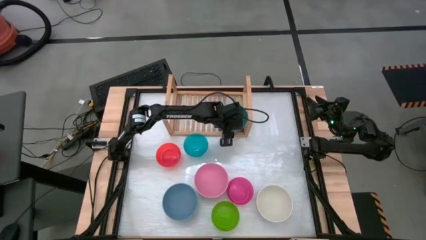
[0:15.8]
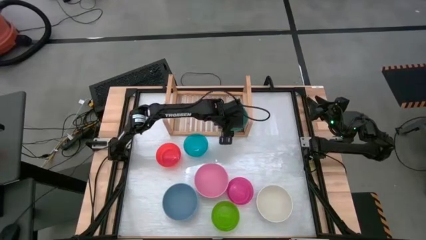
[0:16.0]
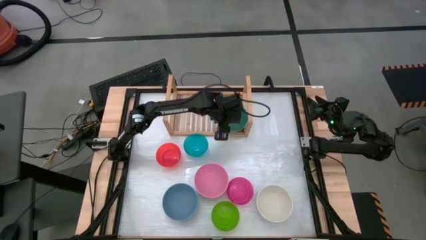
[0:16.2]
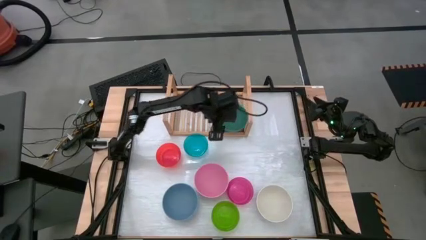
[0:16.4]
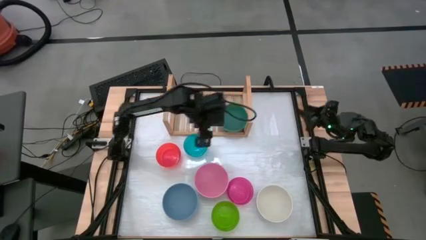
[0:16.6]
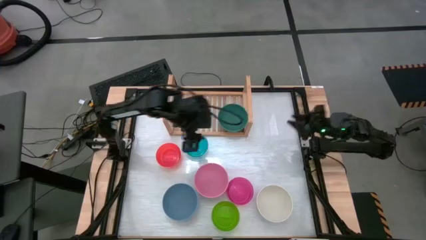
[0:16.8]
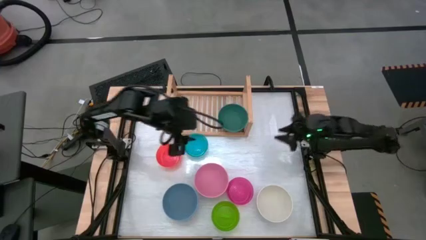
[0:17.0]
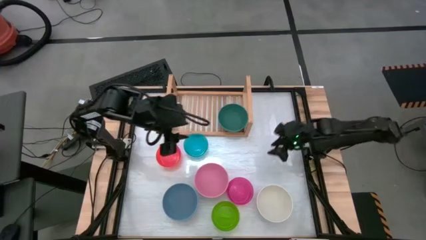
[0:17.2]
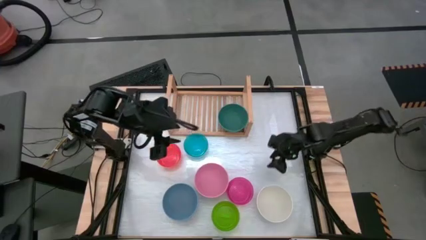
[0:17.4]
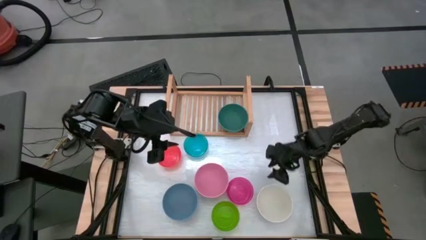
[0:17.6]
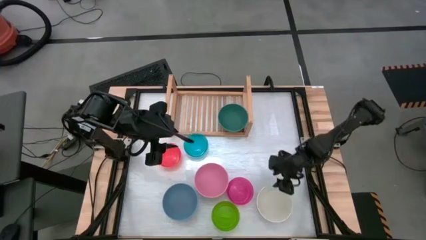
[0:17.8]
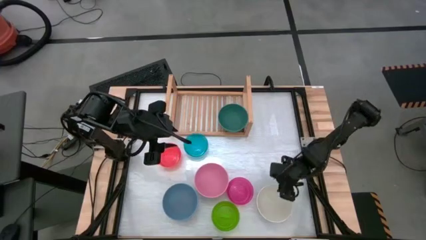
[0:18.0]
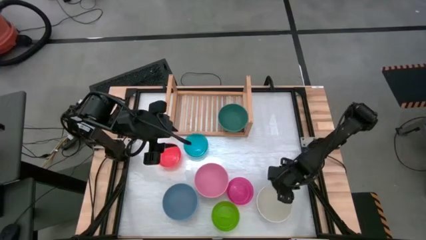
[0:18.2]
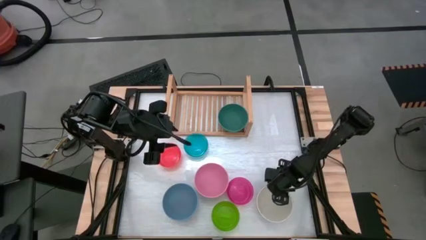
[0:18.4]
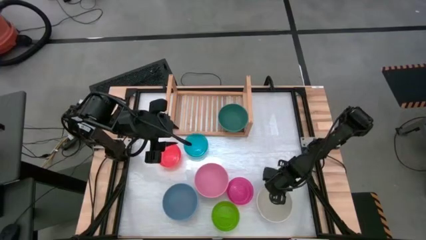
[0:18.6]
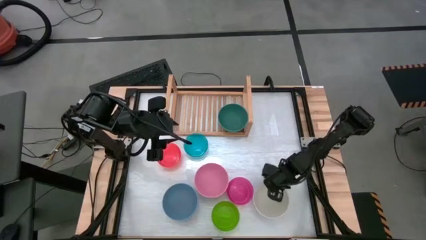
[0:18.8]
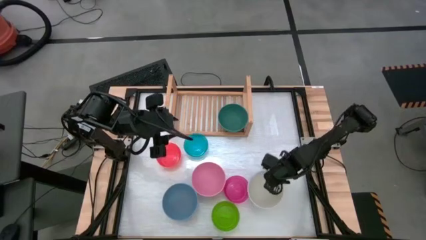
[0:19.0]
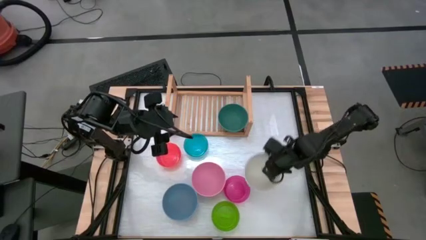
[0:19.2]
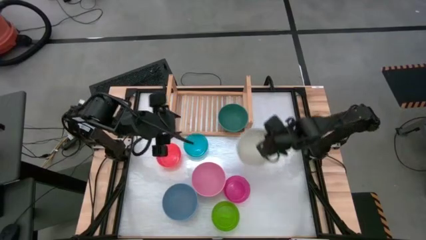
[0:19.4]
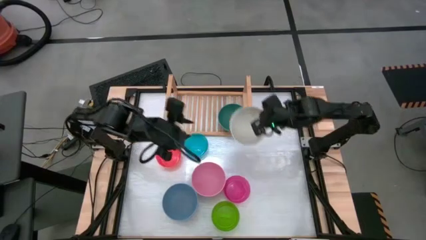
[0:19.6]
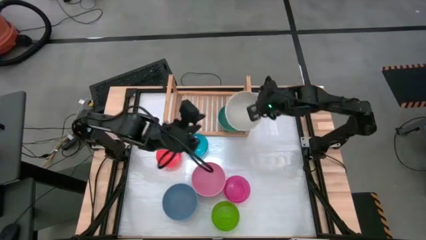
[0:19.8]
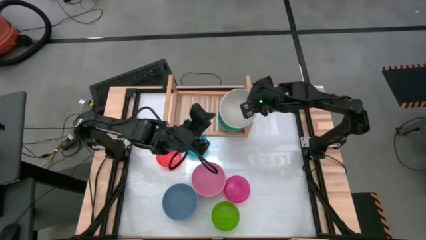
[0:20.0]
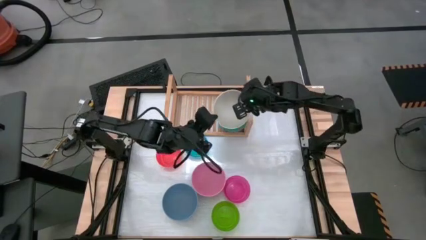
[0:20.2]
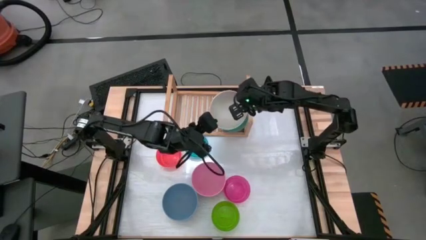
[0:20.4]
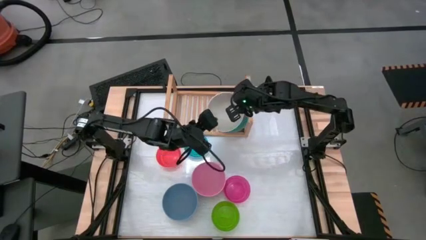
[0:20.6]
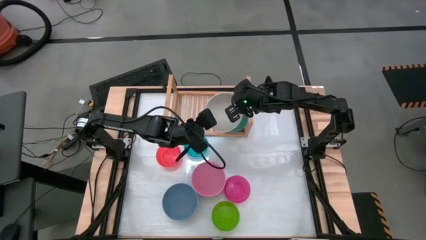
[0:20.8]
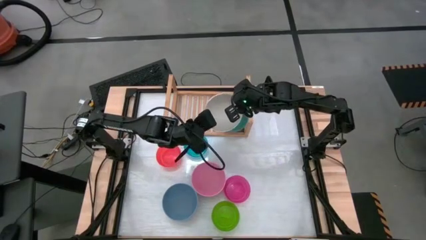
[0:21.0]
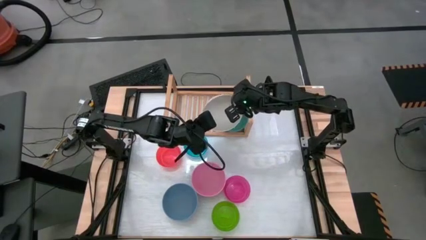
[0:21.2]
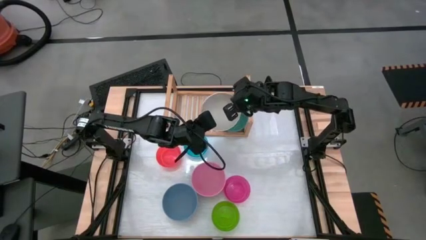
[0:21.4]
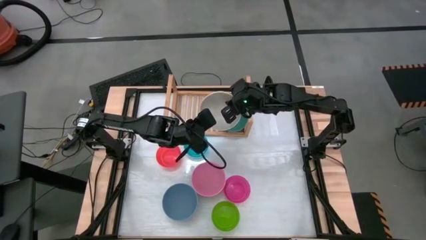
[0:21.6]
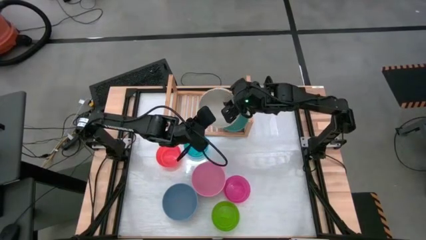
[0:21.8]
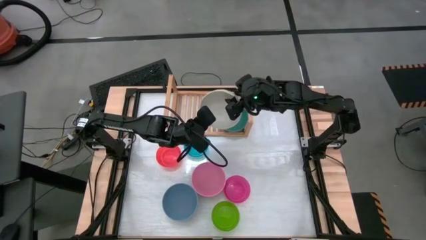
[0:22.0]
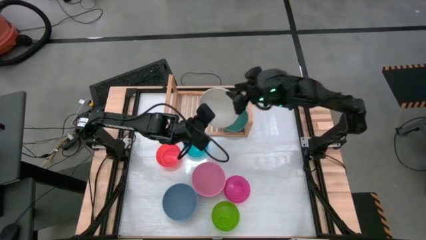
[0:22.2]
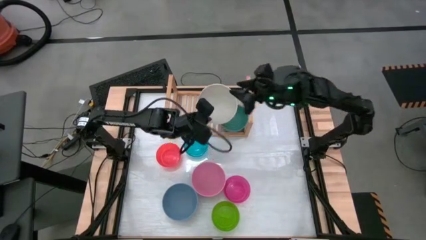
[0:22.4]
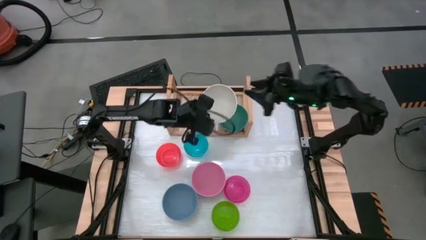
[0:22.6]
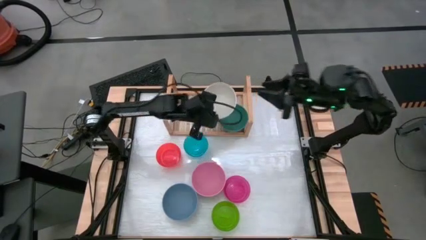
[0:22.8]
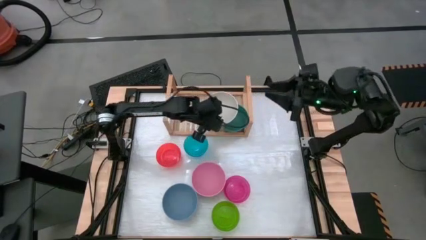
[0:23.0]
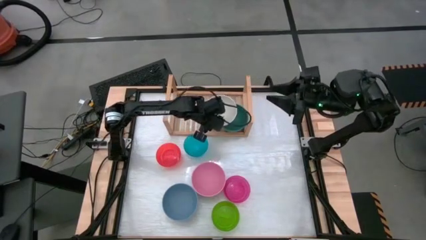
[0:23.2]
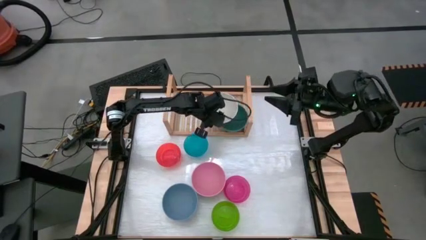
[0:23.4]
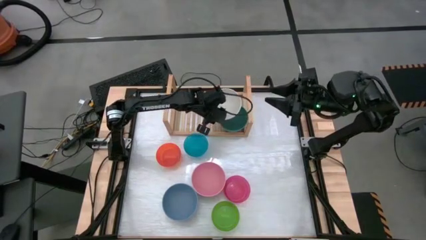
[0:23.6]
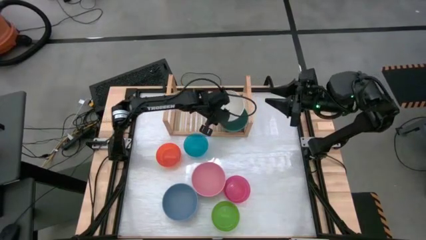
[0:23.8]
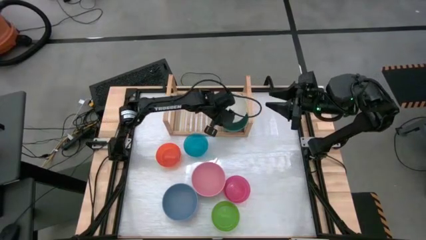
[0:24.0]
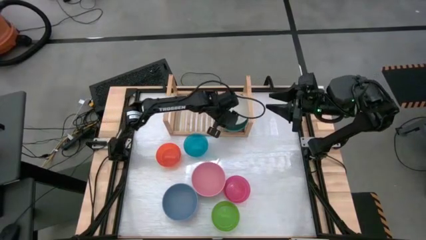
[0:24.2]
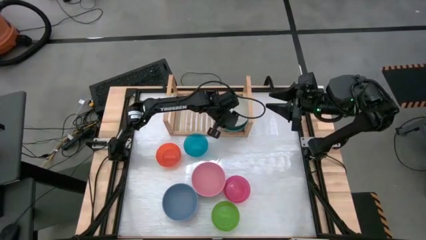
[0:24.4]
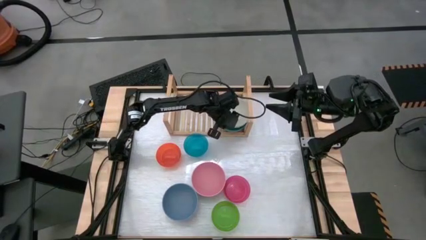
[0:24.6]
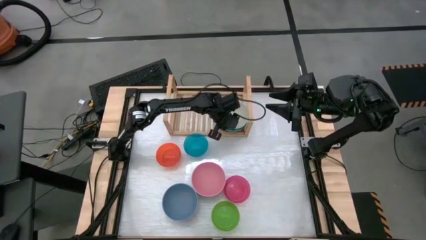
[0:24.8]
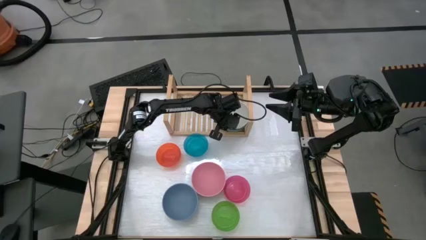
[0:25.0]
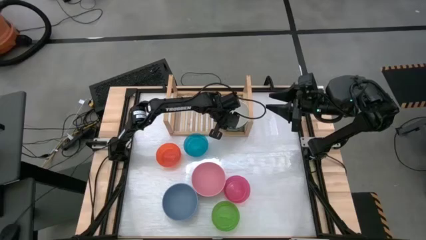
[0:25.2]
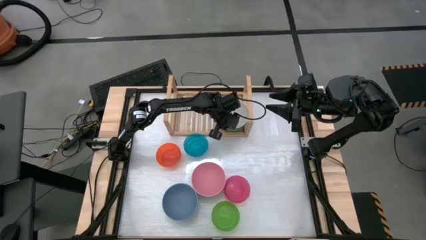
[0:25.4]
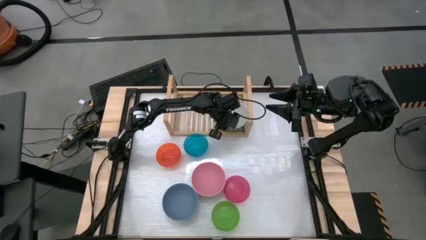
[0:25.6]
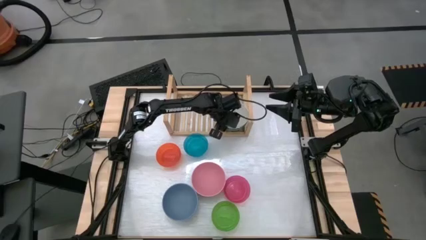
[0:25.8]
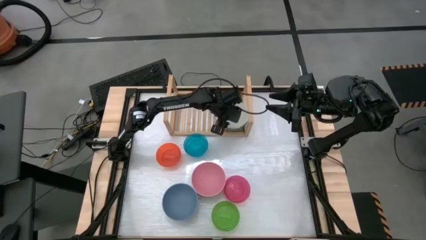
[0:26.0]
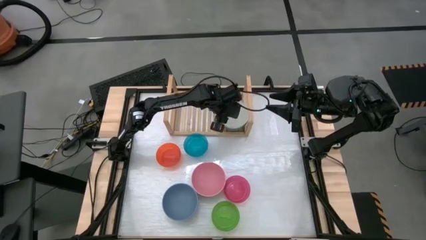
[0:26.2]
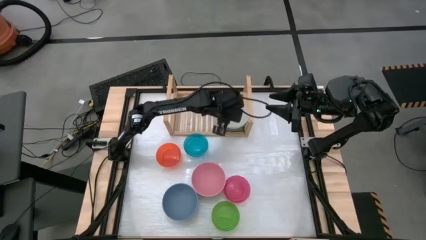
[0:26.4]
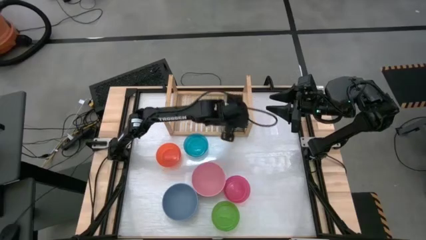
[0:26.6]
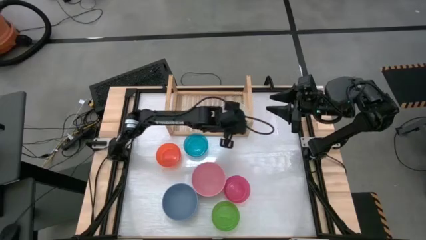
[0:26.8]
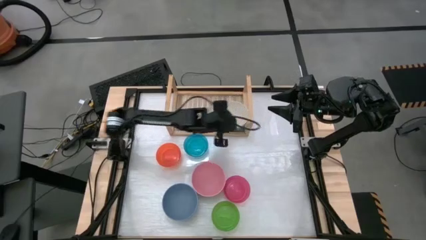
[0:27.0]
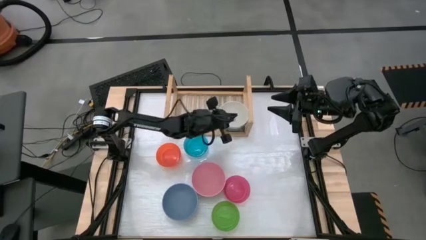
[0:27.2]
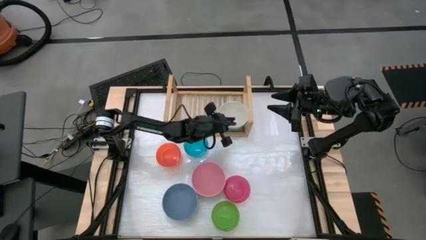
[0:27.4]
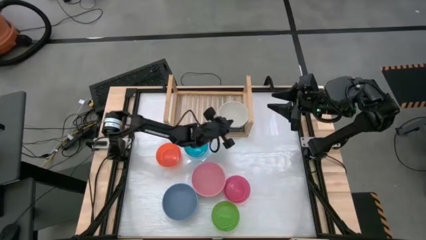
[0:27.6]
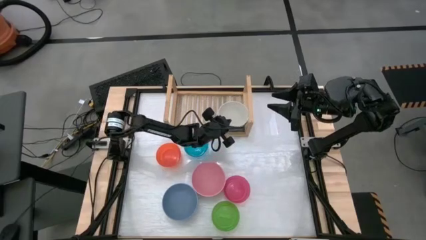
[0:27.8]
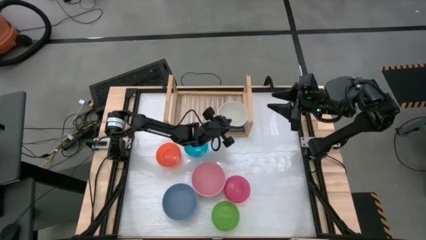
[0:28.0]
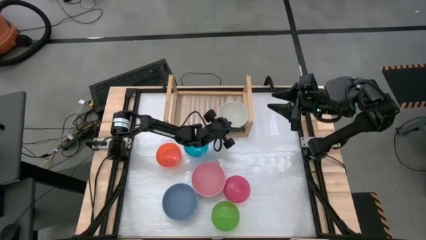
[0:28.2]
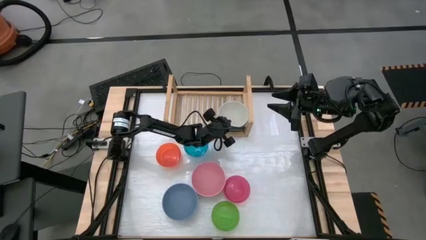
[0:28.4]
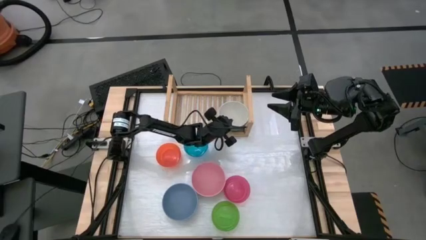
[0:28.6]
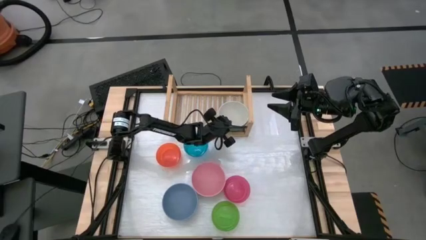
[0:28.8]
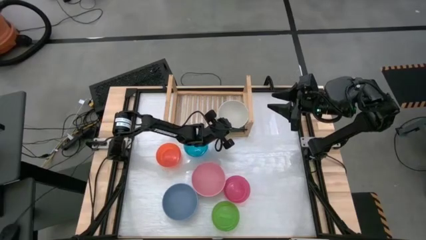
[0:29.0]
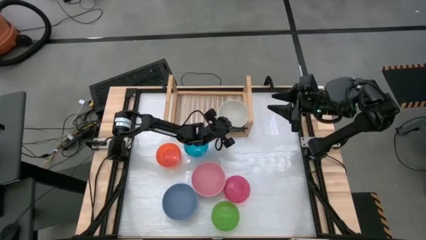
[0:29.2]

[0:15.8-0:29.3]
Task: Place and stack bowls onto a shelf
Stack the white bowl on top of the green bowl on the shelf

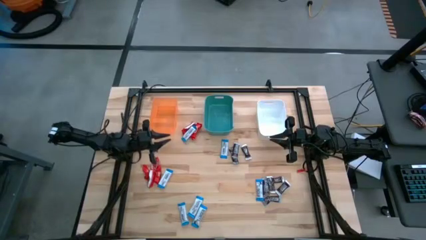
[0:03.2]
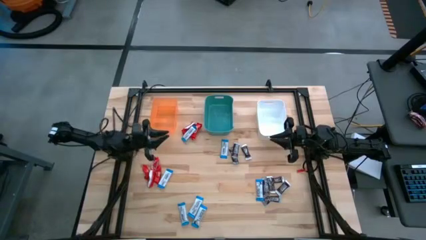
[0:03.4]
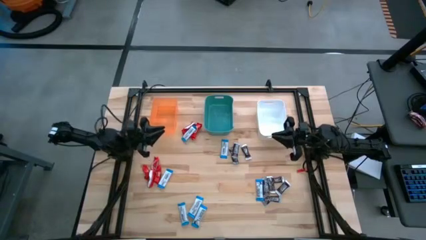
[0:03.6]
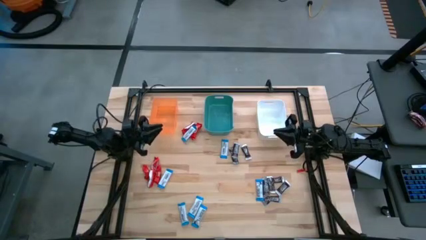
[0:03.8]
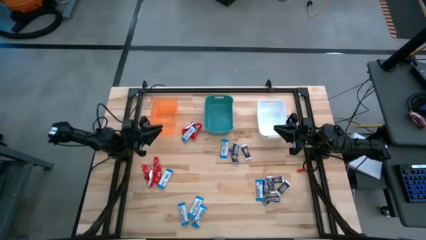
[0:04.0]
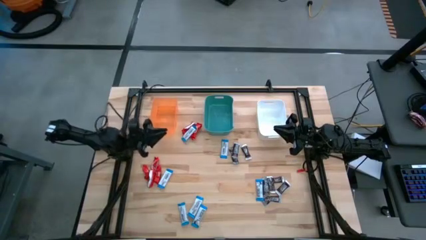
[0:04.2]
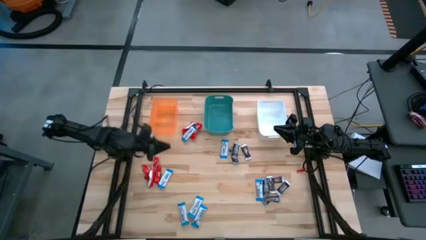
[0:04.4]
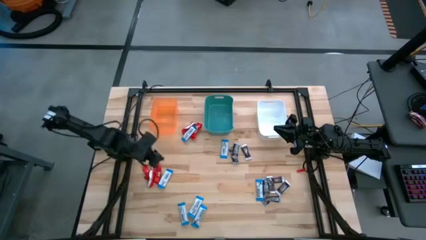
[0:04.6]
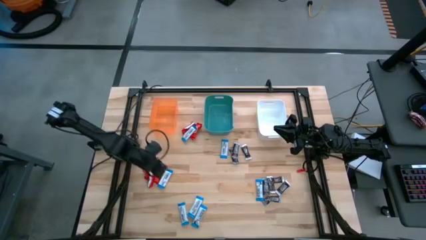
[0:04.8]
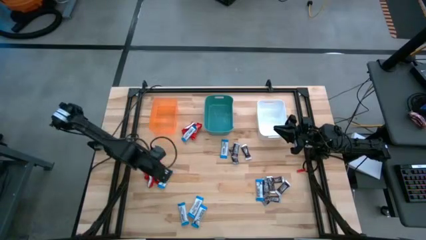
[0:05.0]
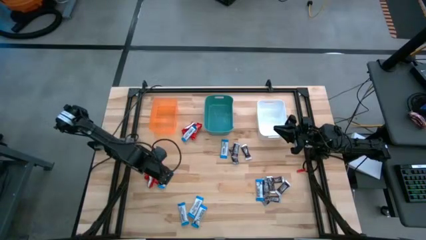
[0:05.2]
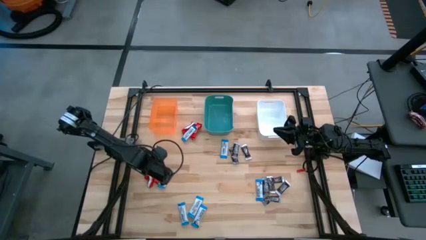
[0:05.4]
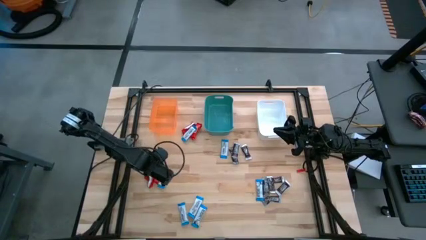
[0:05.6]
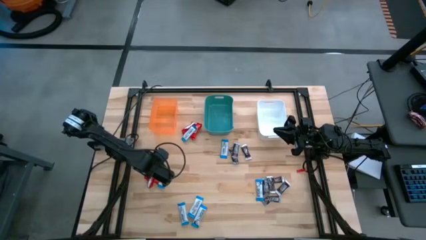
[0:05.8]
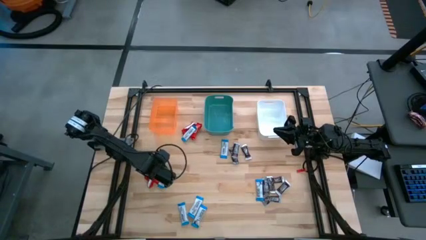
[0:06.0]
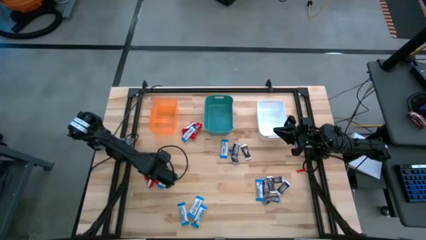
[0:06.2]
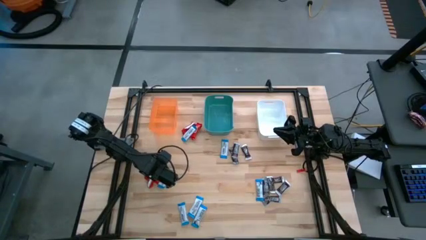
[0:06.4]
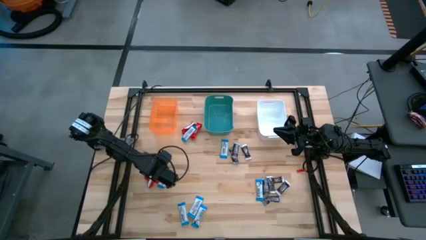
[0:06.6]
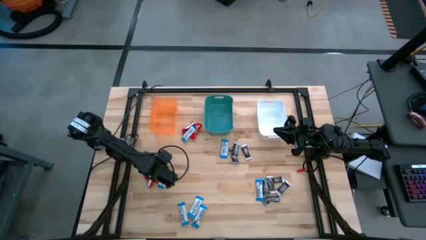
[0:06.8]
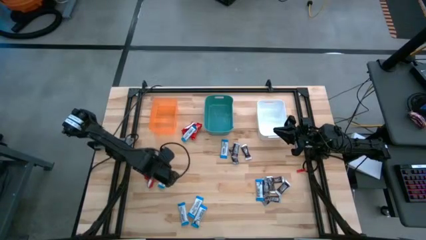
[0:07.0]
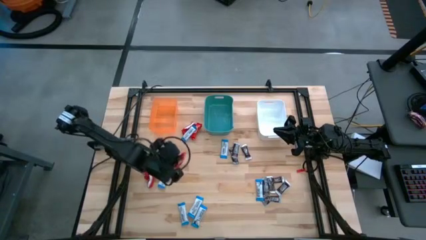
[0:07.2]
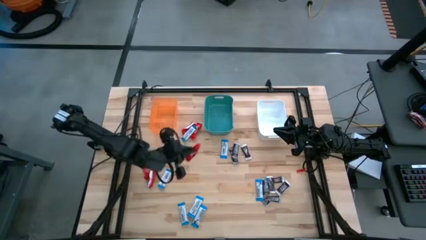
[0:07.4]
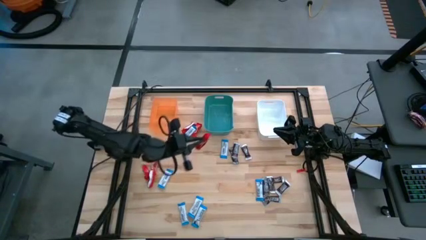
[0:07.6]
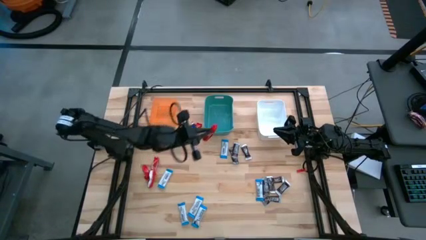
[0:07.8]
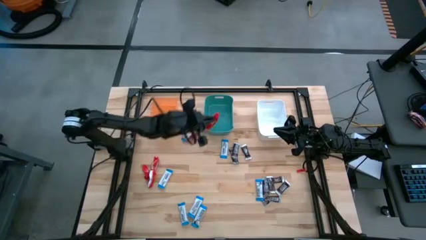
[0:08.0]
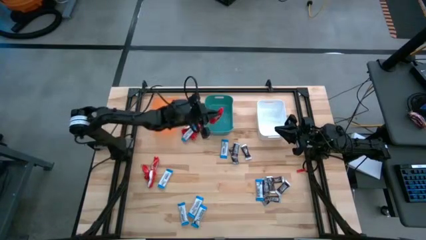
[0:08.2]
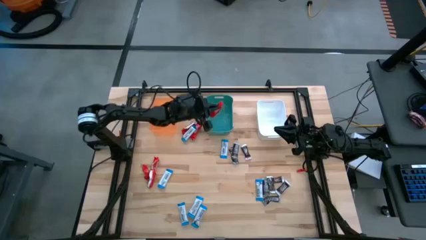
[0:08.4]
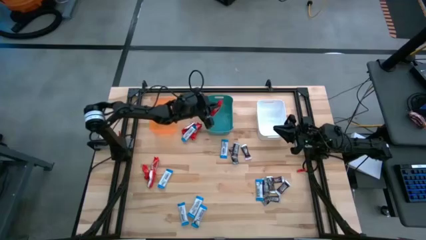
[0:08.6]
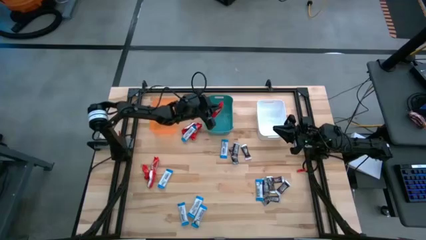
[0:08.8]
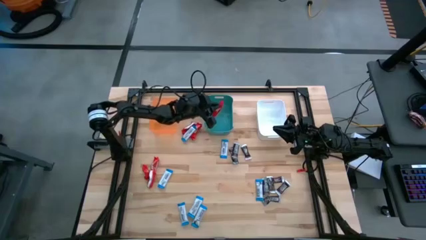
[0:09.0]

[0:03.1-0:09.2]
Task: Organize candy in baskets
Put the red chocolate bar into the green bin
